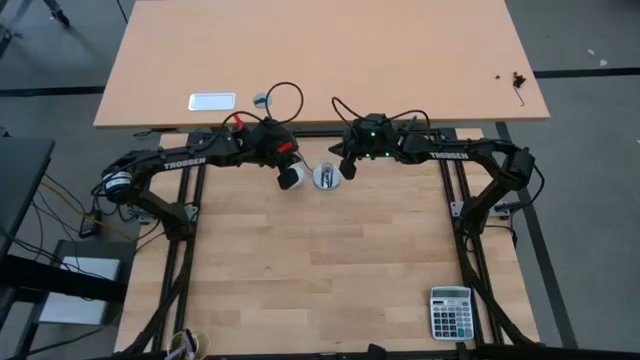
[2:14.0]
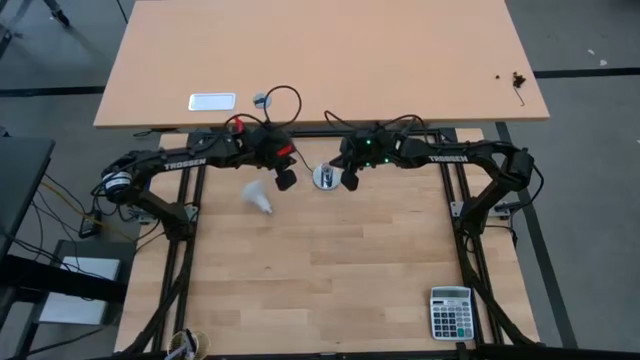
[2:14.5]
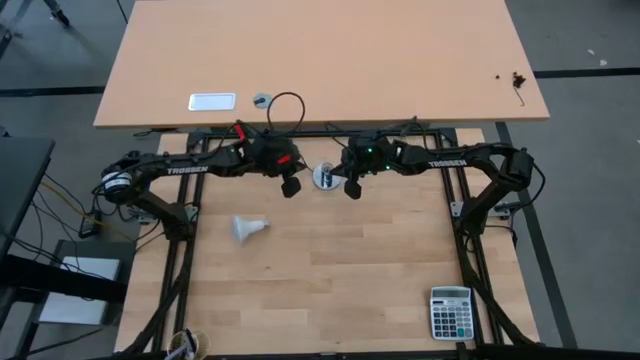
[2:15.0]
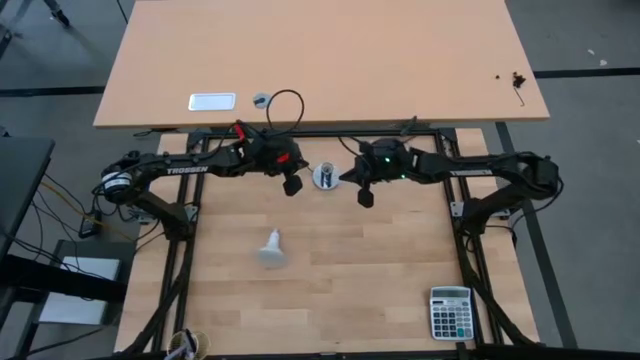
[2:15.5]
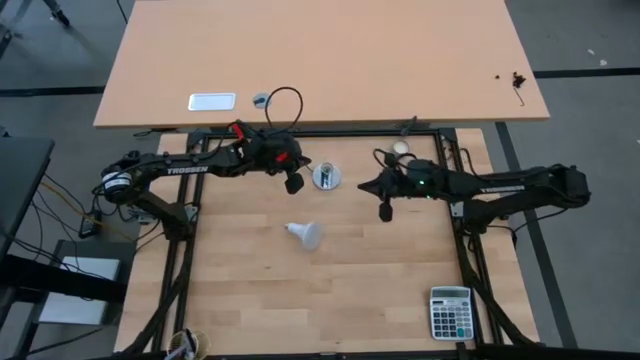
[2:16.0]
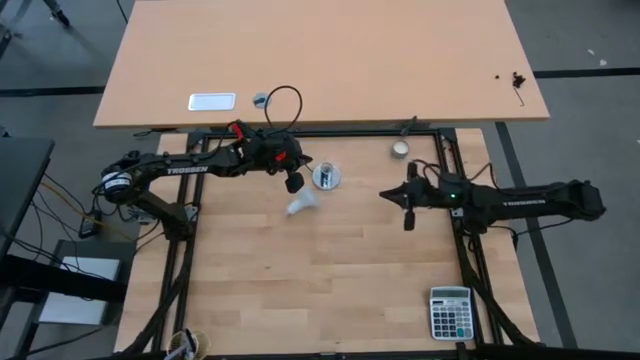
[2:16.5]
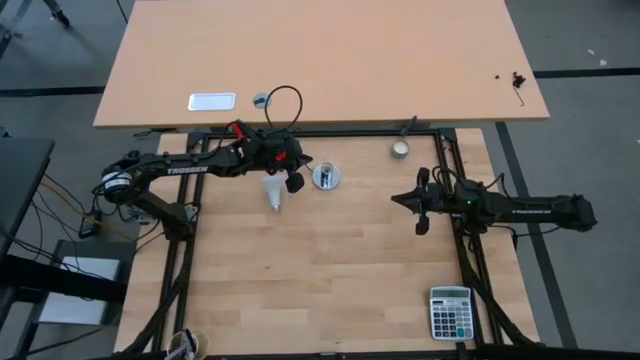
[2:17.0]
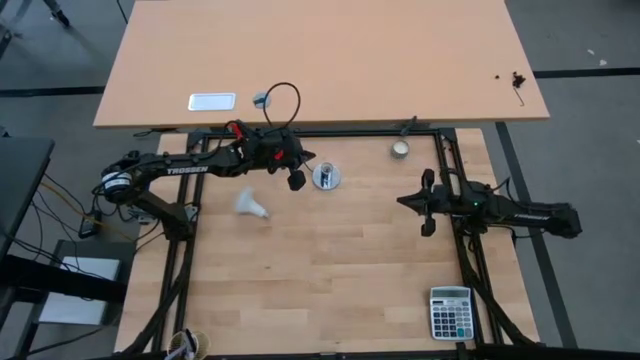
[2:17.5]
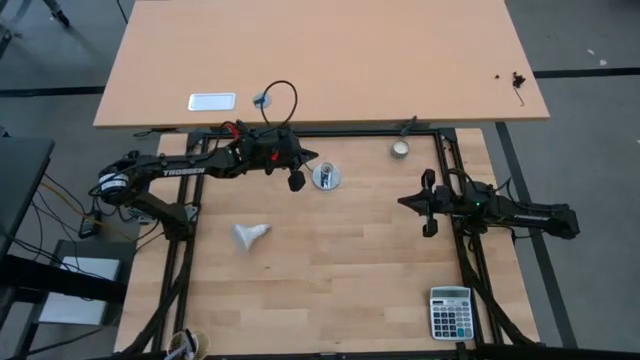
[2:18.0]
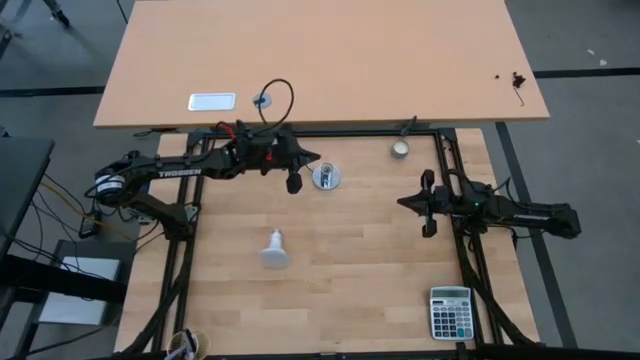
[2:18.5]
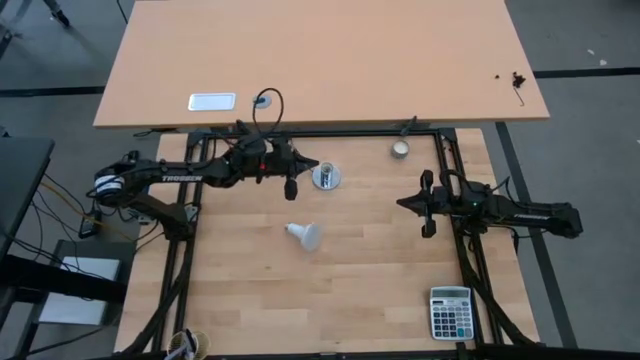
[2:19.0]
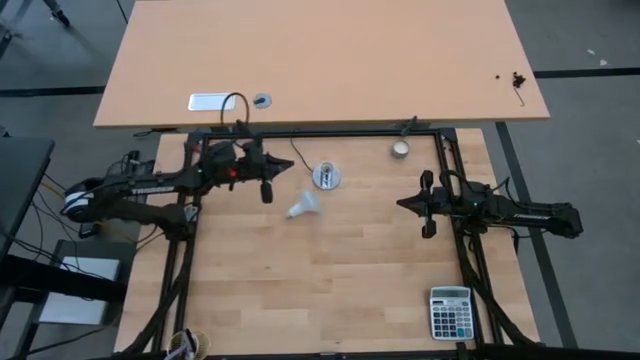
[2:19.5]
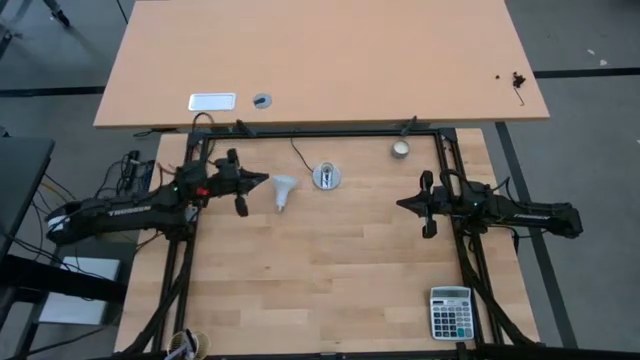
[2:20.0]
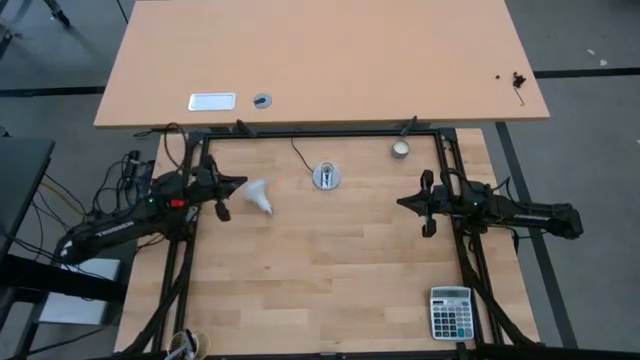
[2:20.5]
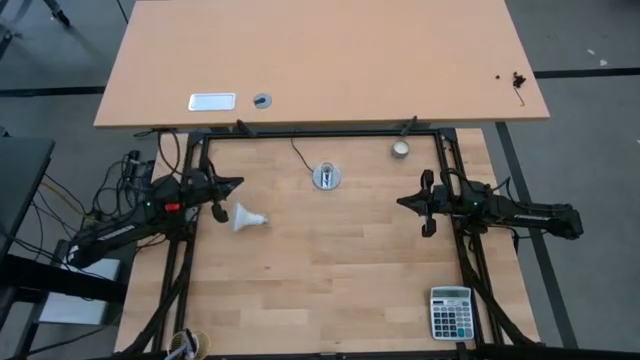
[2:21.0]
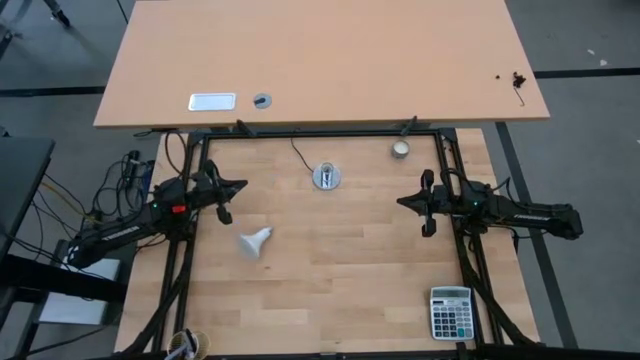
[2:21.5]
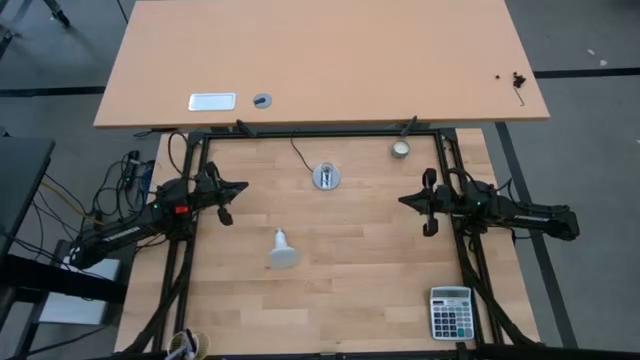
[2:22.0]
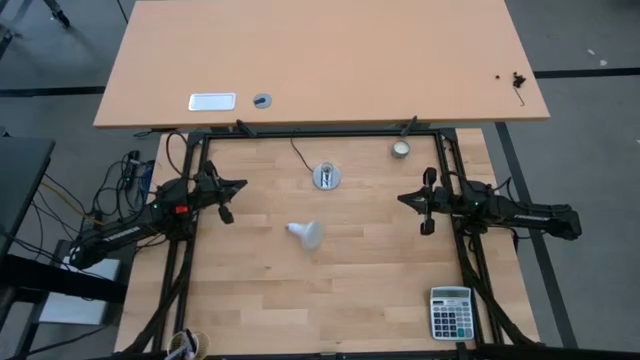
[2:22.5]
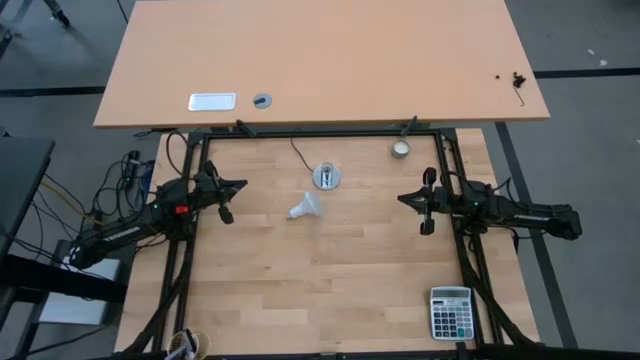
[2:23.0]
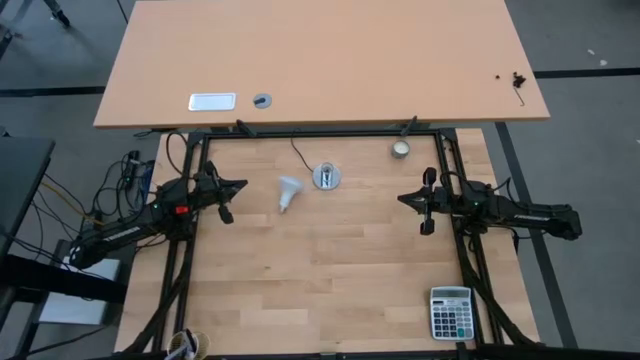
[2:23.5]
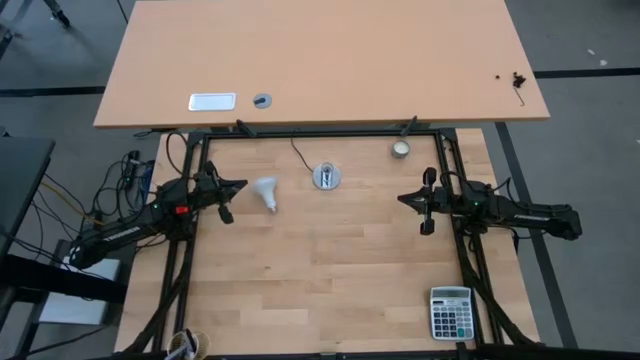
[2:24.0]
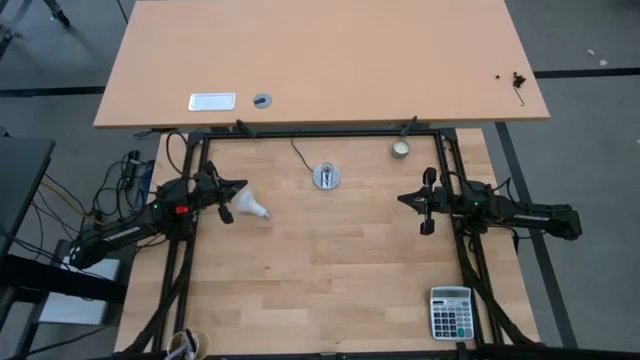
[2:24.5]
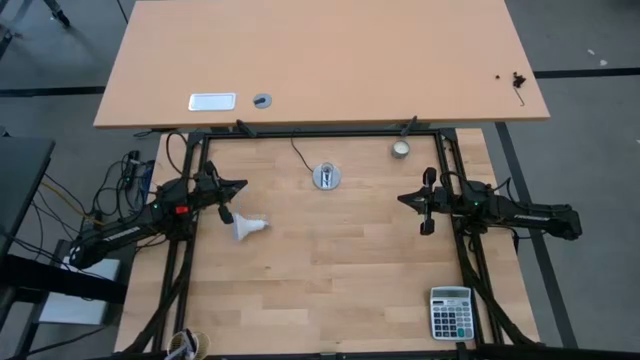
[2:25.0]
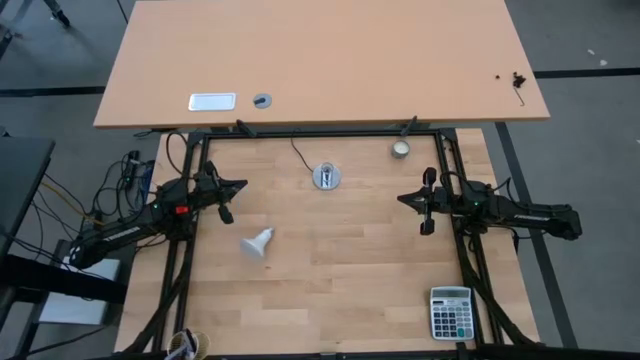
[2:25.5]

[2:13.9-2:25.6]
Task: Screw lightbulb
Return to Home Position

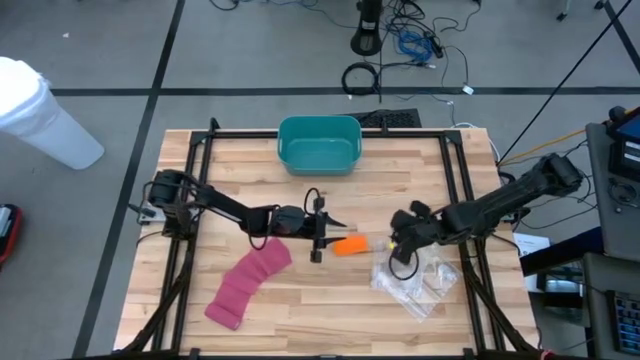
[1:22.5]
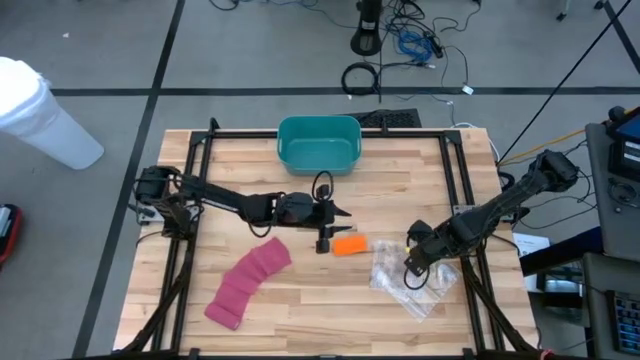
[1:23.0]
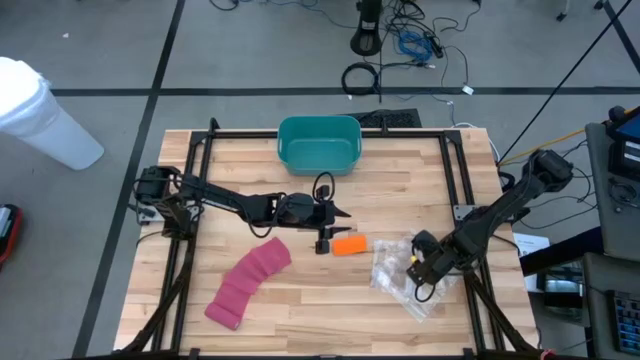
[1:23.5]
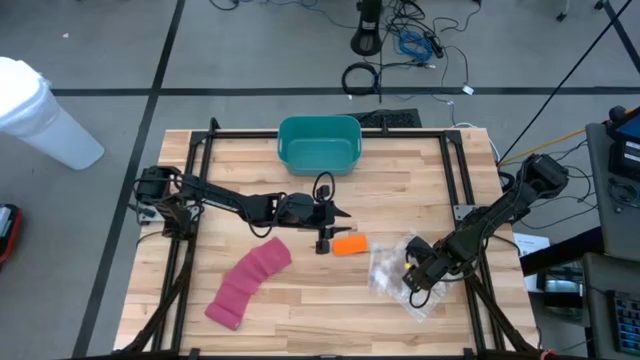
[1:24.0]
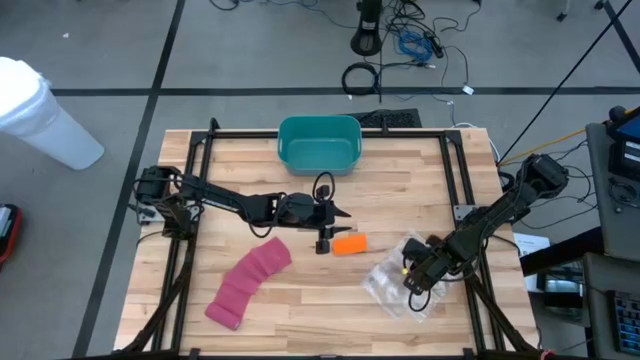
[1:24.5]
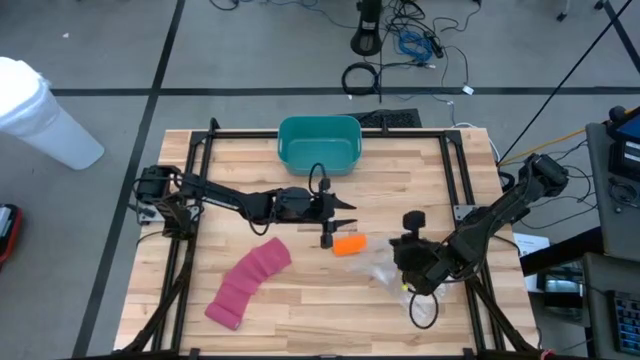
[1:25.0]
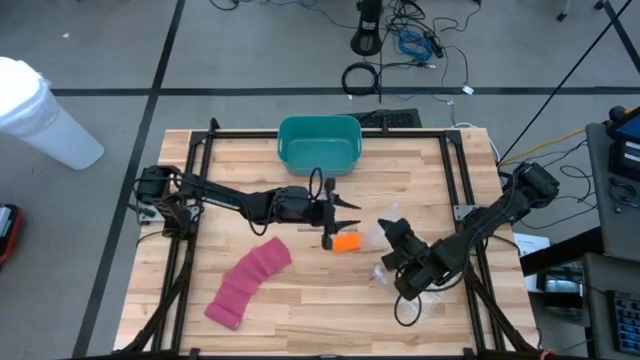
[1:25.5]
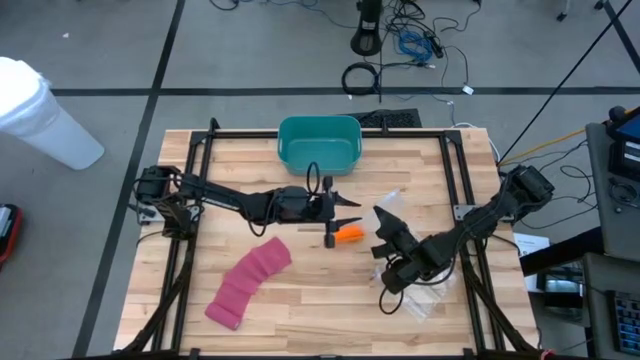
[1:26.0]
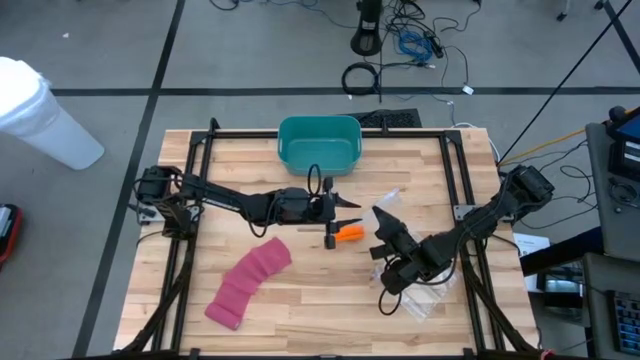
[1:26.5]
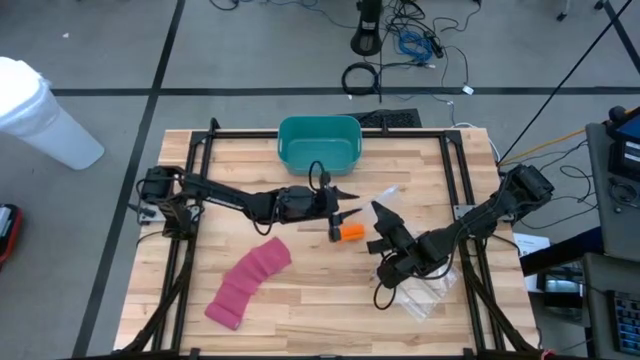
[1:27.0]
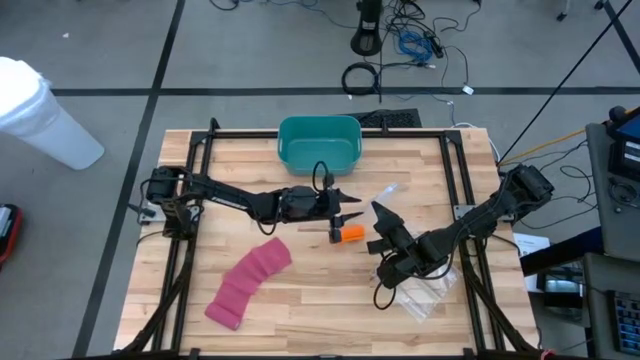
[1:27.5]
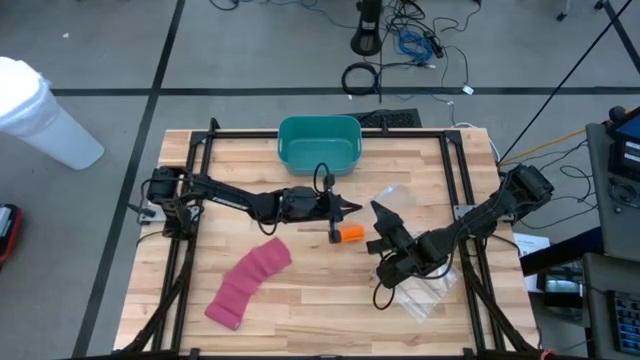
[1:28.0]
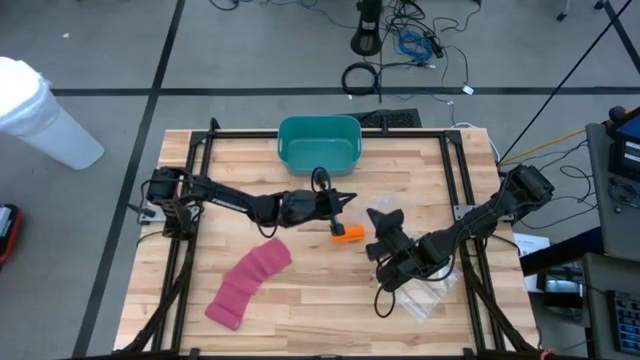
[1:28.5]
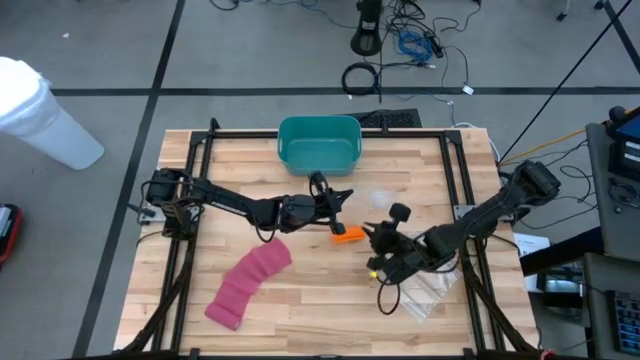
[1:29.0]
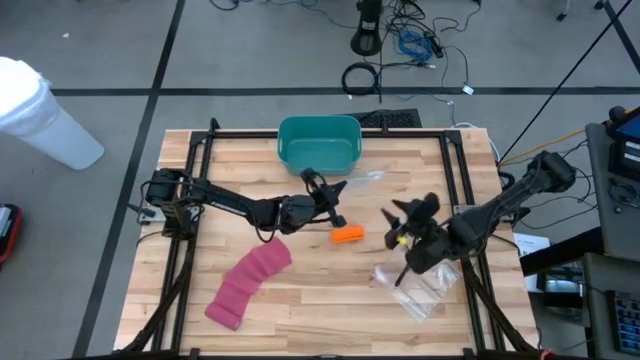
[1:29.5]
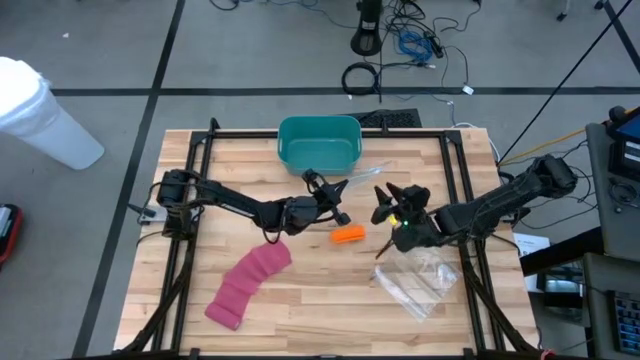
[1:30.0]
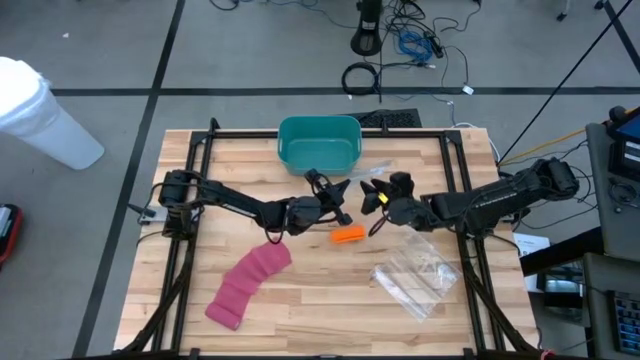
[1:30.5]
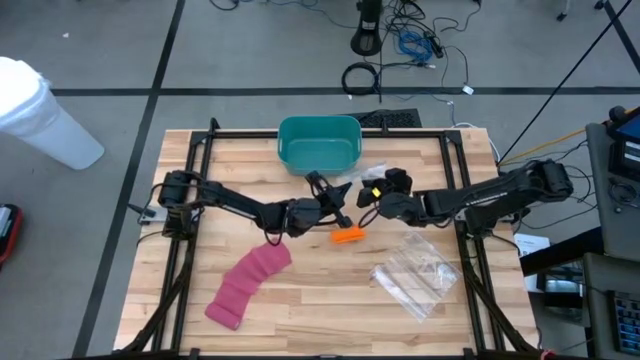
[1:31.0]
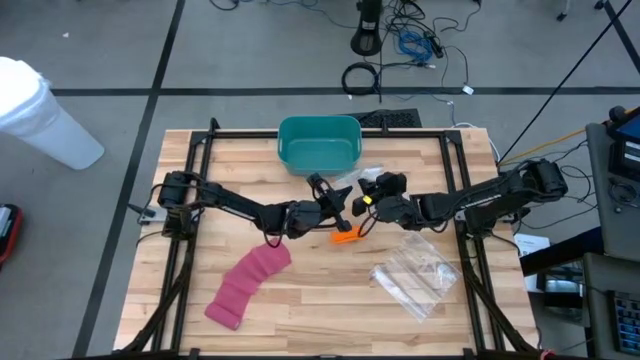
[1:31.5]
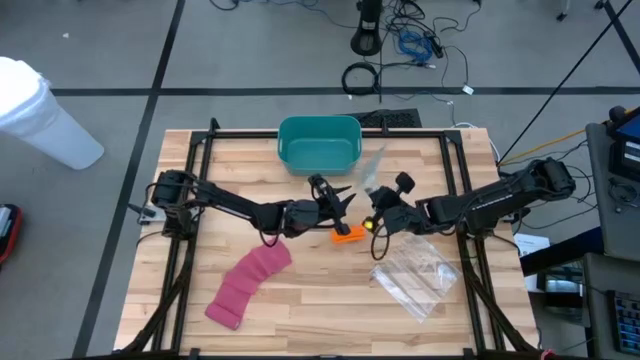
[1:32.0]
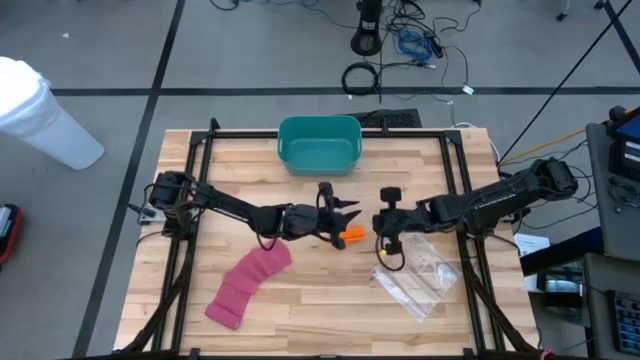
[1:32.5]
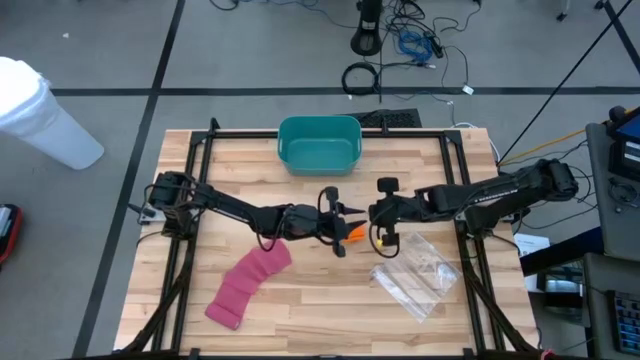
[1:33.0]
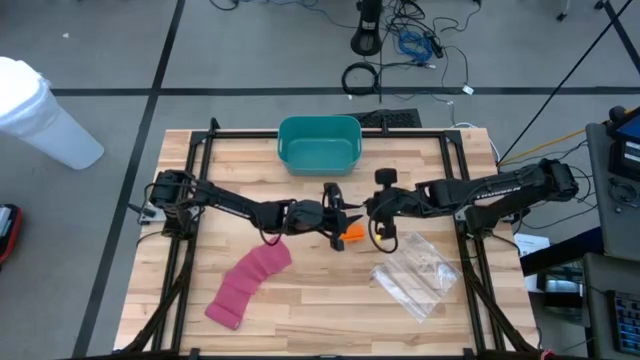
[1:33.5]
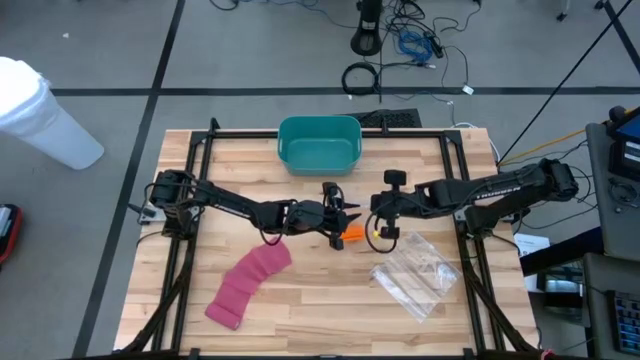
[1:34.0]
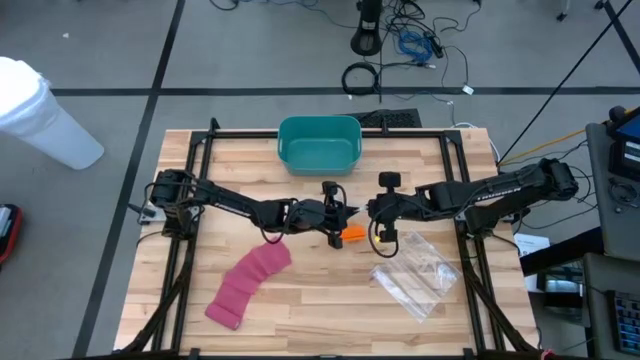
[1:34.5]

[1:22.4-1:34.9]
Task: Roll bandage
Put the orange bandage into the transparent zip bag
